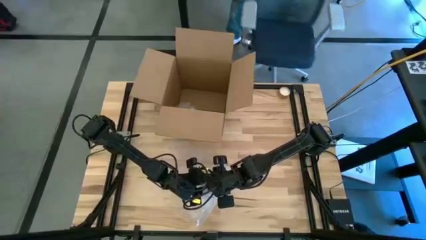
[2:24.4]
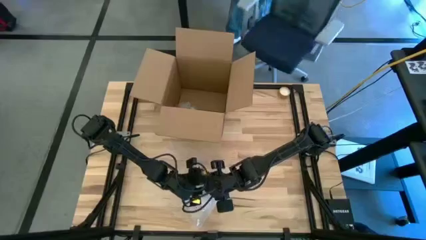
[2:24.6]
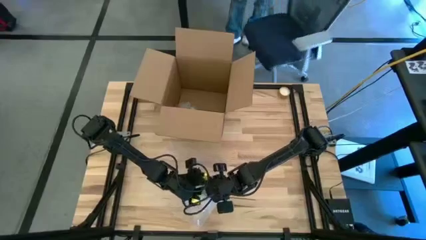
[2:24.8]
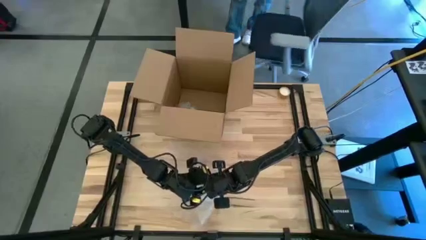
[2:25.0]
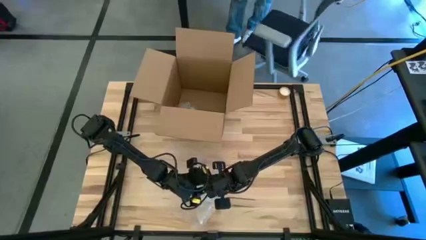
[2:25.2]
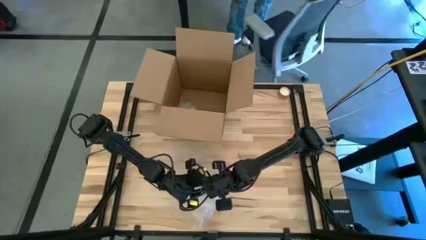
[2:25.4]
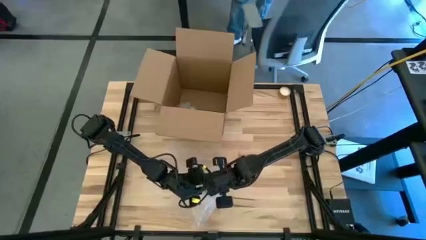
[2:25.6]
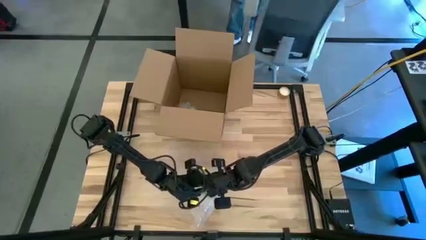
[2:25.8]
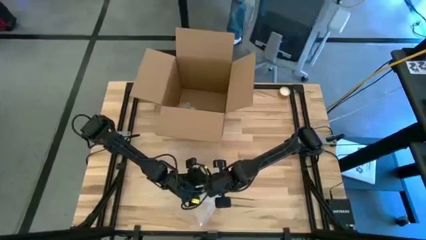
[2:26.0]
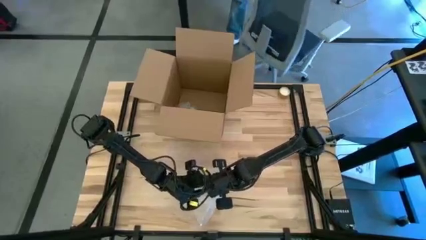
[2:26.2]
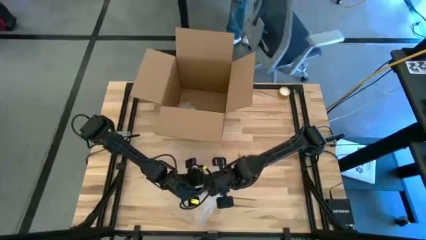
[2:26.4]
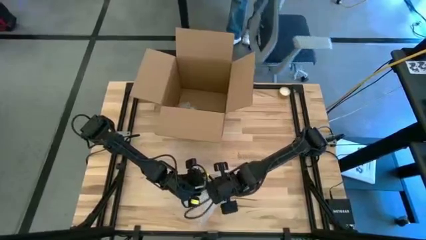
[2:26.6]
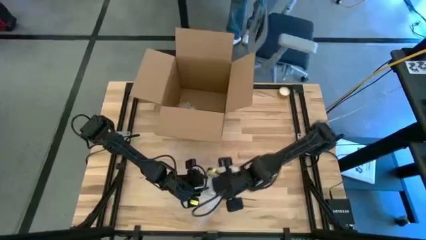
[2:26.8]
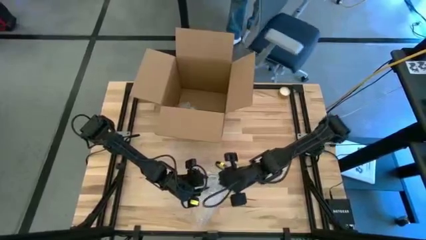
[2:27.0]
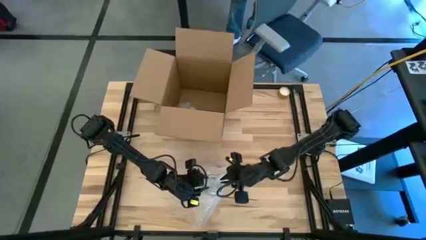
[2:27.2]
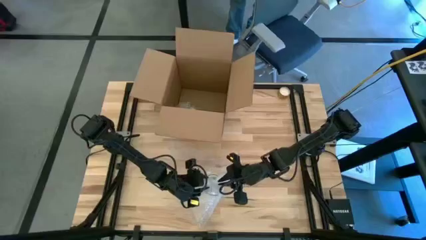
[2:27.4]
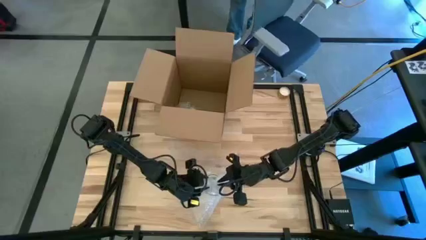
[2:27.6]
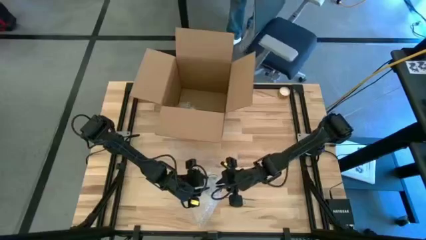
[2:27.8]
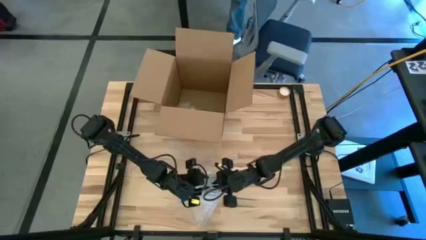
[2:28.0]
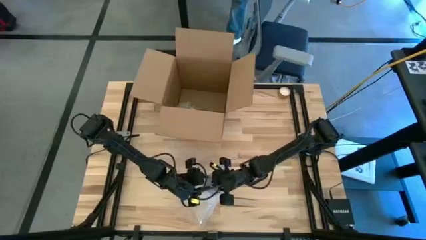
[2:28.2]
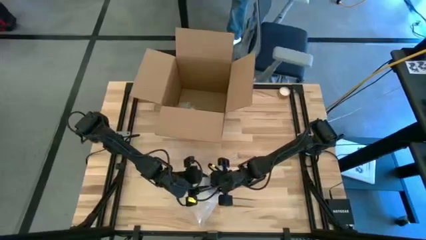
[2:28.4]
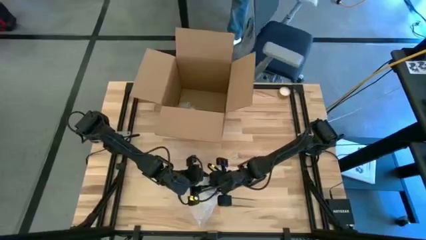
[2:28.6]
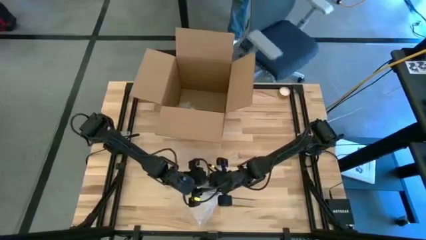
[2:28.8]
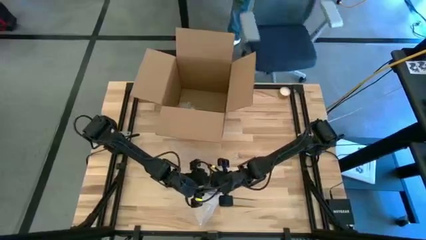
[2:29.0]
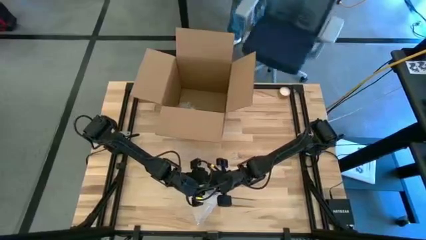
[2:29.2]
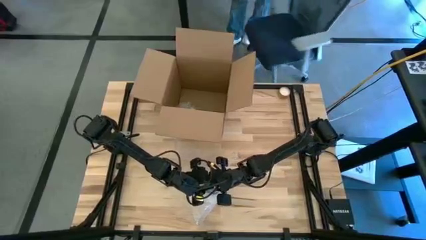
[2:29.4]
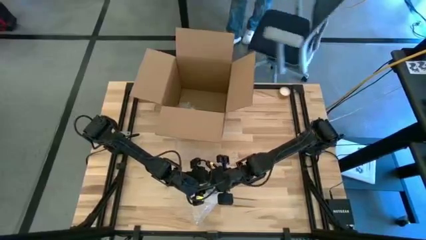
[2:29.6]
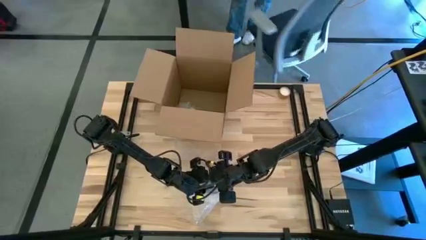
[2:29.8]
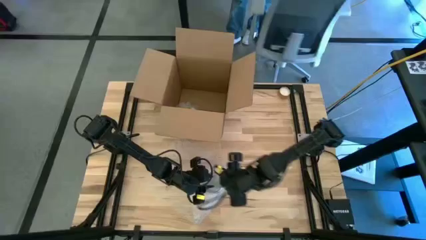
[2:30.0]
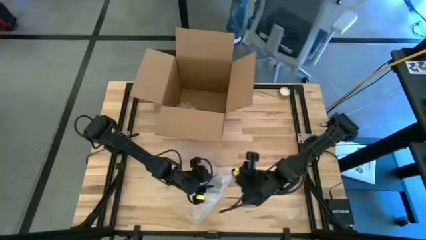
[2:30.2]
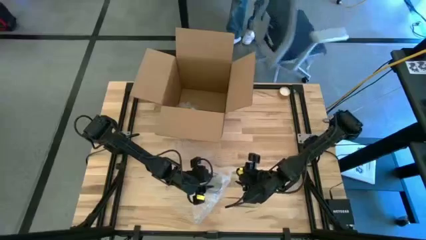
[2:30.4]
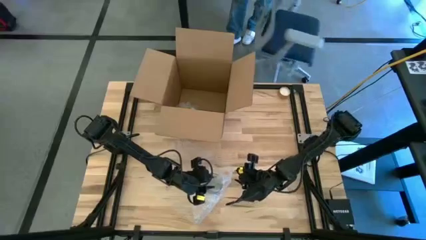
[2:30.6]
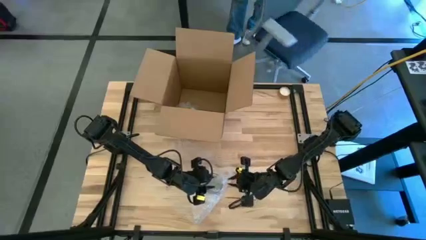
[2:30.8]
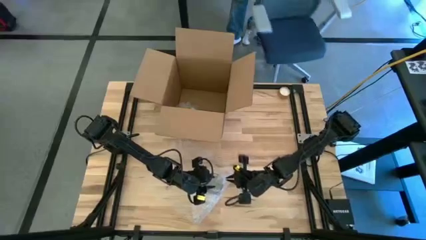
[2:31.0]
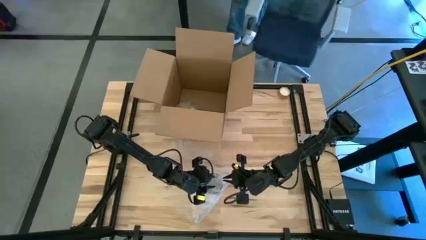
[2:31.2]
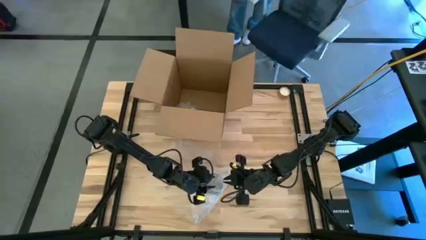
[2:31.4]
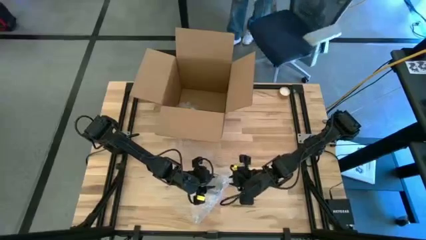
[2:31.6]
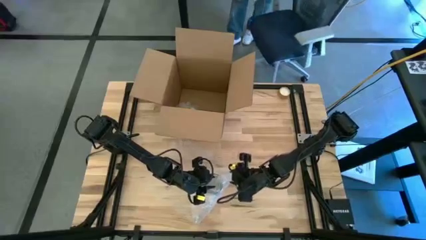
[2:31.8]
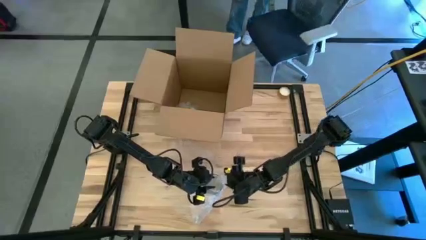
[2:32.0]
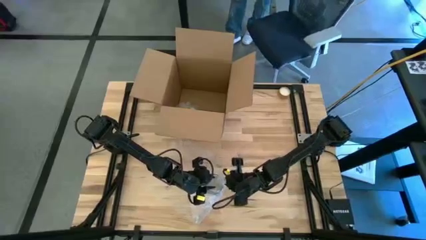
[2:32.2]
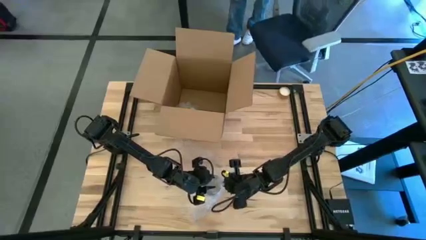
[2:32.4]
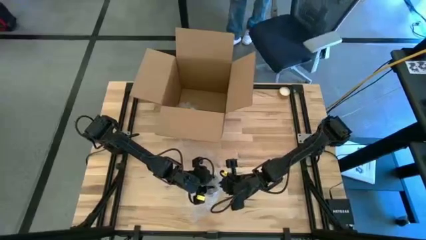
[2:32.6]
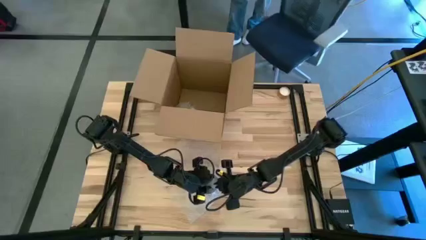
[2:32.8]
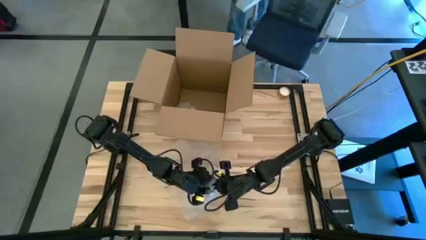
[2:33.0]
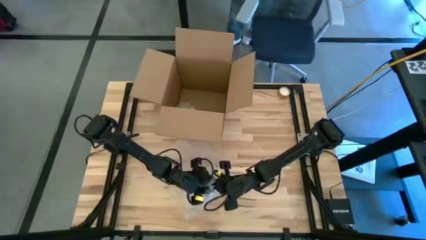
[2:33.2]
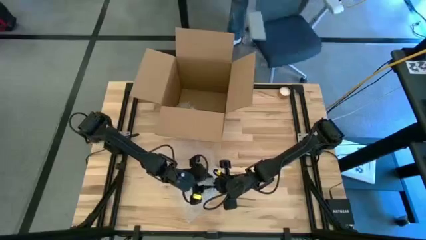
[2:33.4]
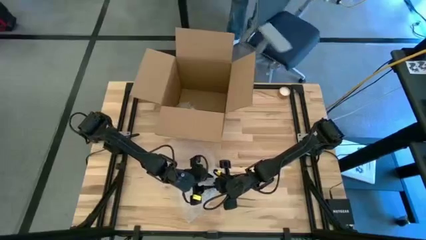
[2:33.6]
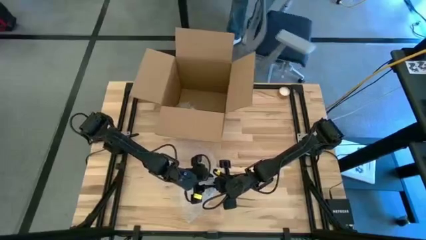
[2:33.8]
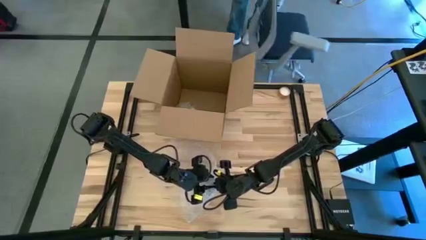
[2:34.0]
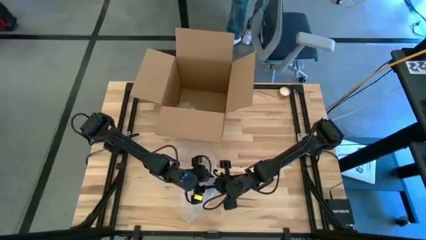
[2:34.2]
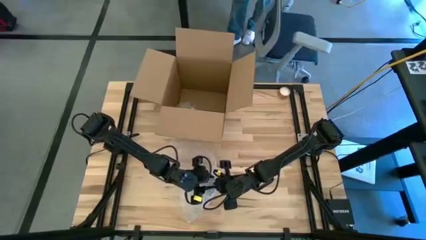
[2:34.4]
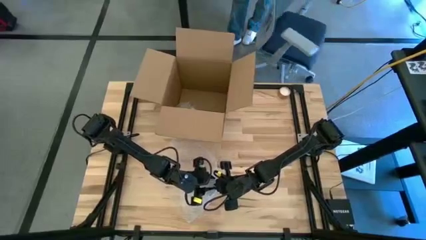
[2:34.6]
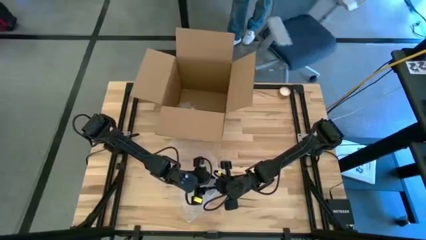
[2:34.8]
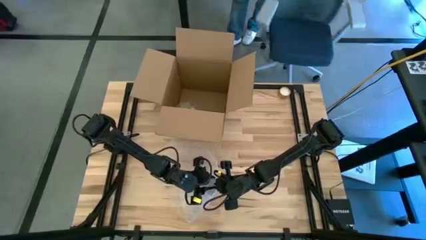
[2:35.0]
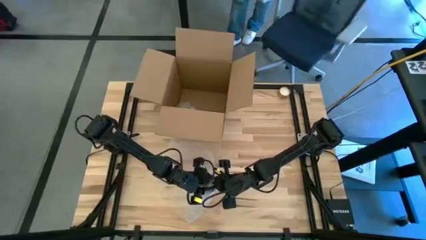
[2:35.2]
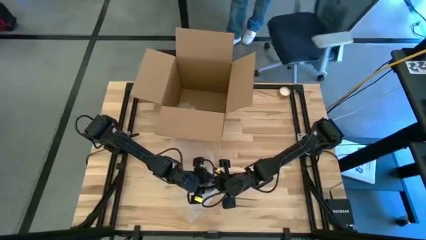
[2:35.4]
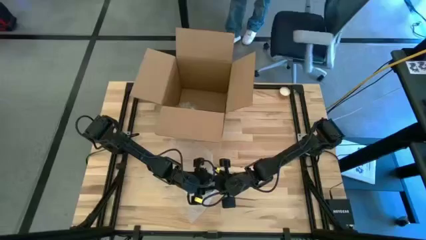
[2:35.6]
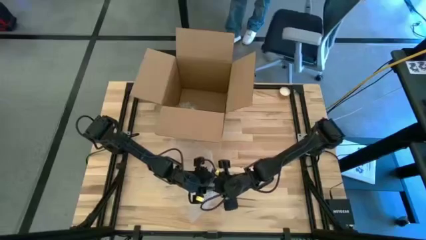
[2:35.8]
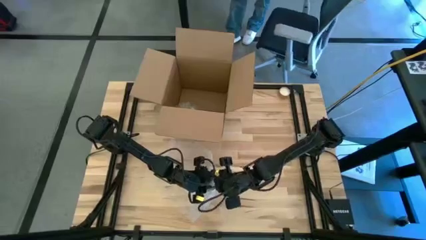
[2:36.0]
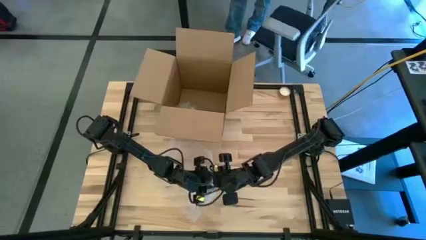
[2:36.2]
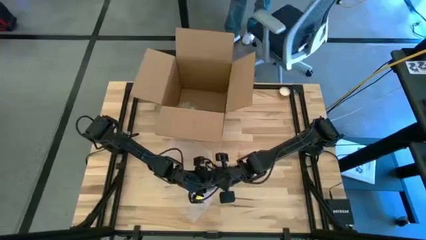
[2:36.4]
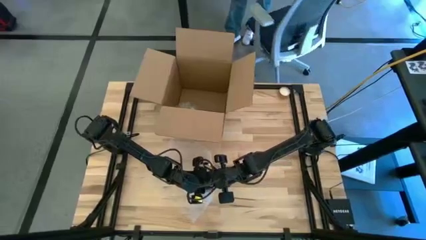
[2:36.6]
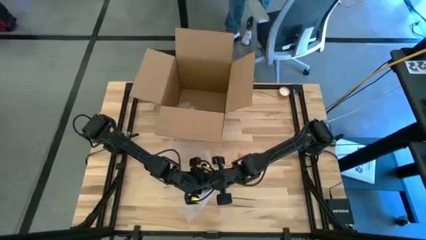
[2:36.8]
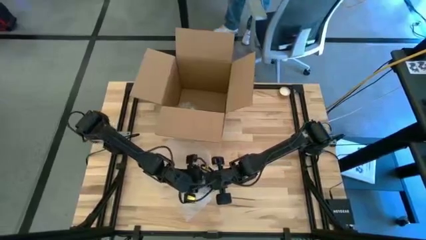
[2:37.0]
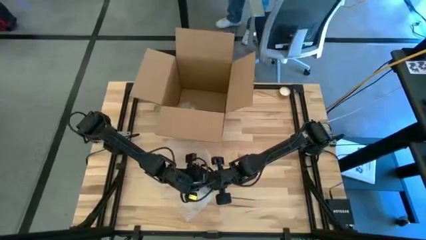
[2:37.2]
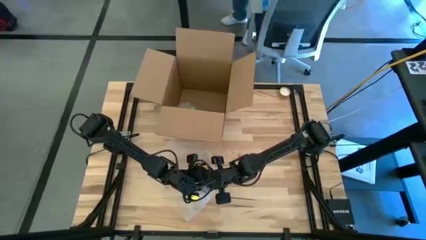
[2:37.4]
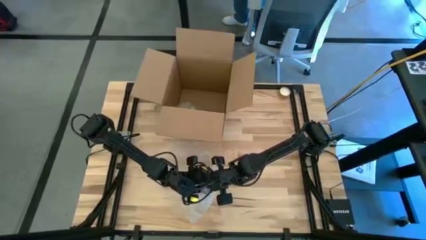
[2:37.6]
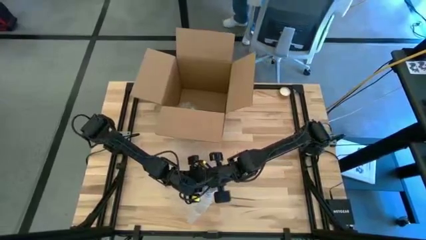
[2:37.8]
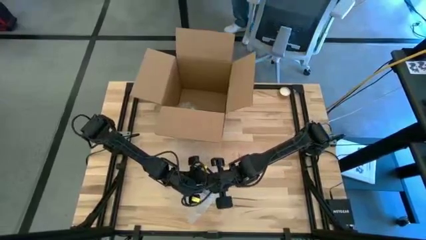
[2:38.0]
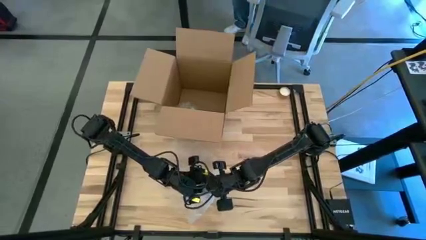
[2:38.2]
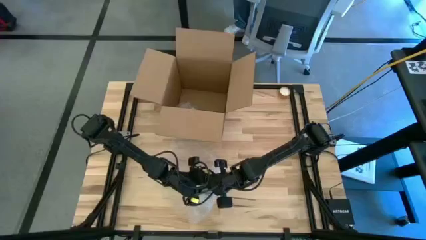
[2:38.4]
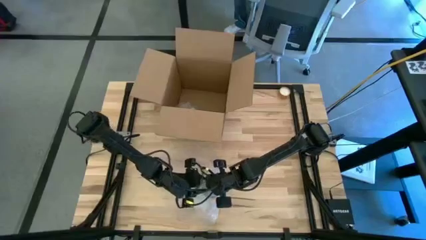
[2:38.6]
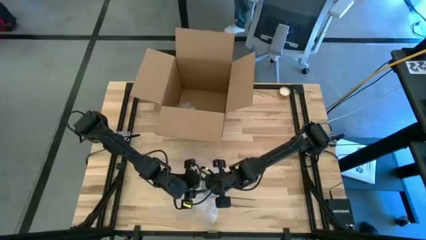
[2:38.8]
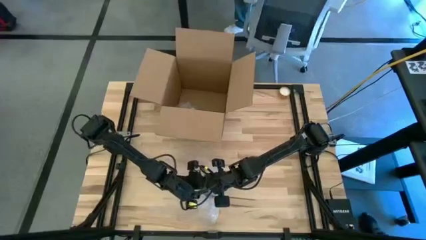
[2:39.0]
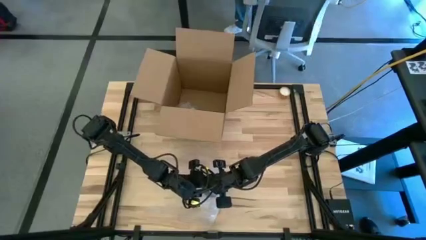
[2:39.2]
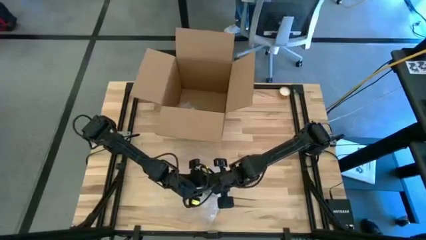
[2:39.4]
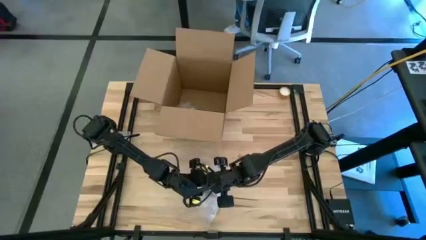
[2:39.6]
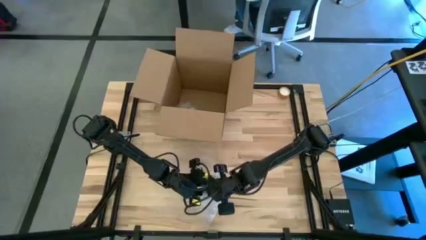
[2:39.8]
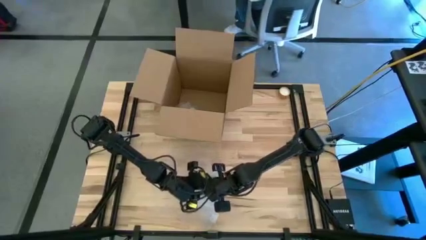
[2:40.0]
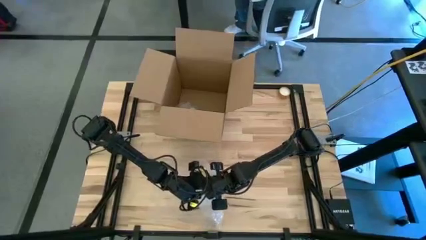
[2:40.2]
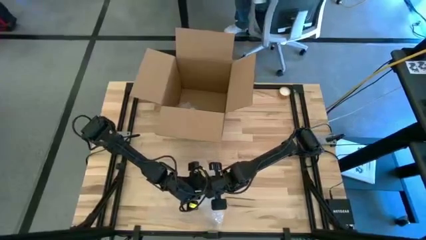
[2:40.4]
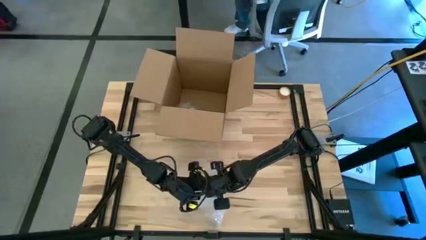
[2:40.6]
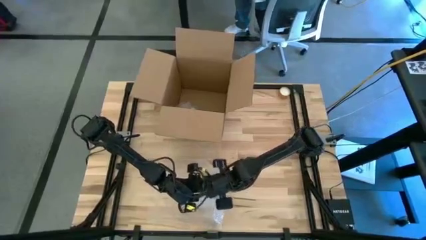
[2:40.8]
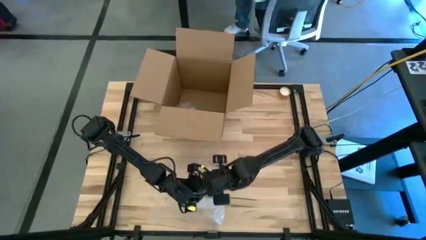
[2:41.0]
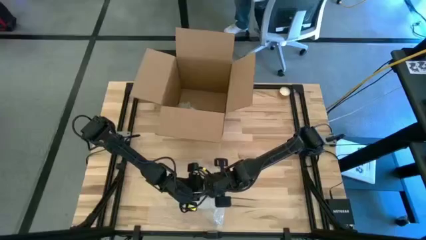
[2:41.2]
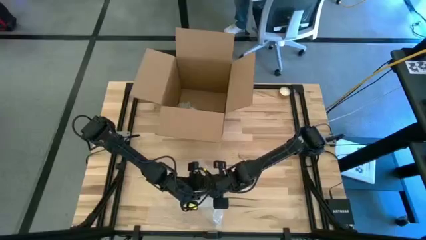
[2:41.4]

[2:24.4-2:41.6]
Task: wrap mug
Wrap the white mug with transparent bubble wrap
